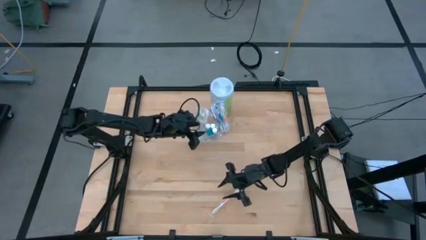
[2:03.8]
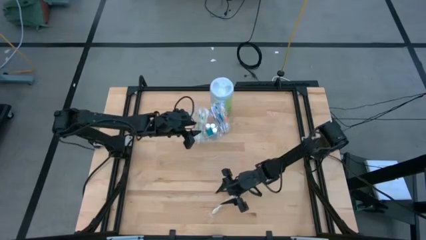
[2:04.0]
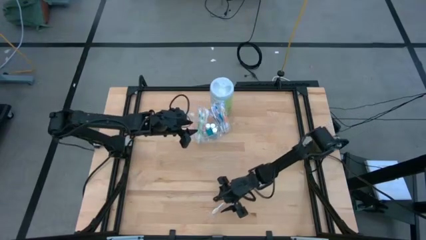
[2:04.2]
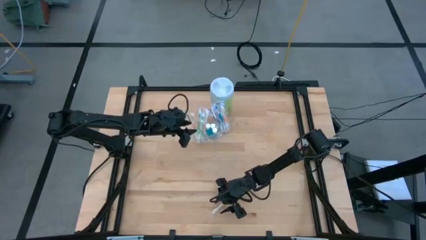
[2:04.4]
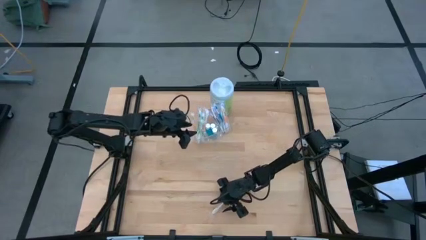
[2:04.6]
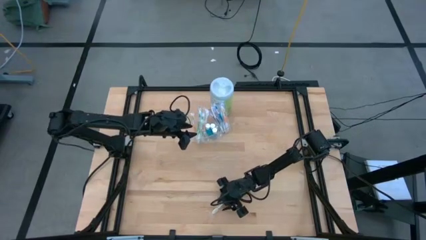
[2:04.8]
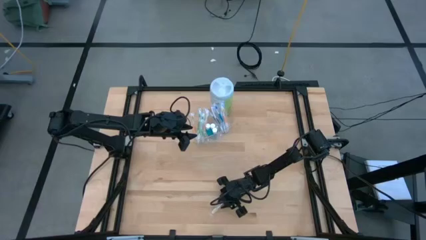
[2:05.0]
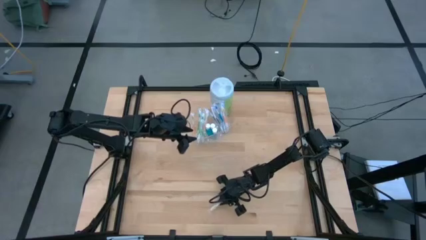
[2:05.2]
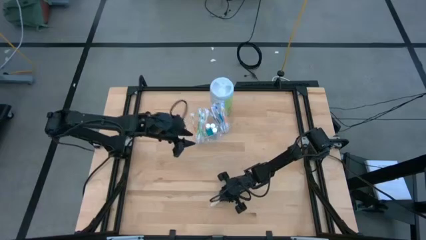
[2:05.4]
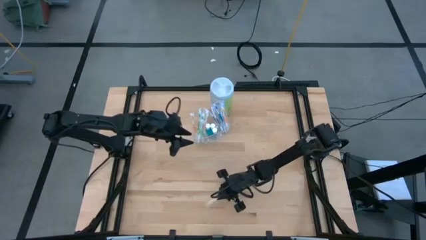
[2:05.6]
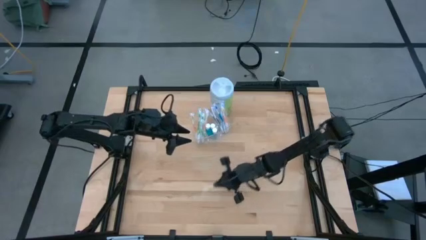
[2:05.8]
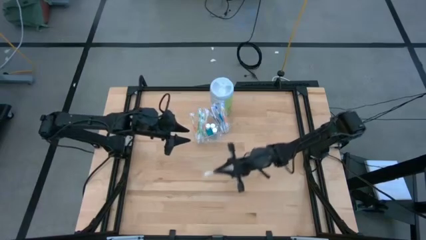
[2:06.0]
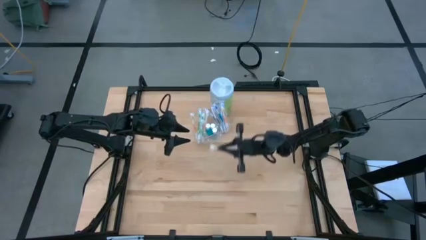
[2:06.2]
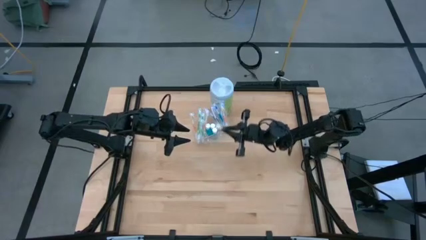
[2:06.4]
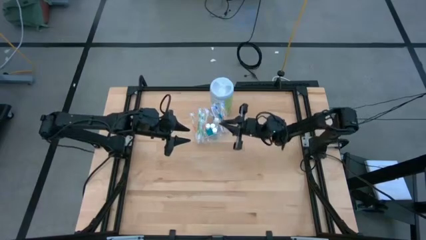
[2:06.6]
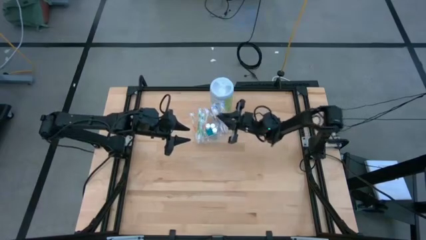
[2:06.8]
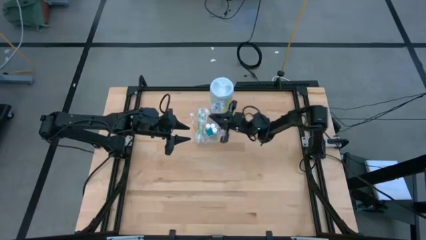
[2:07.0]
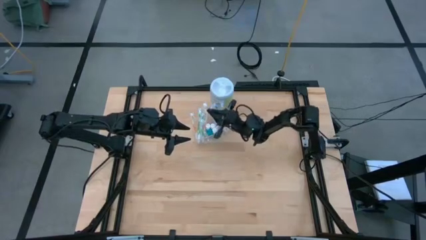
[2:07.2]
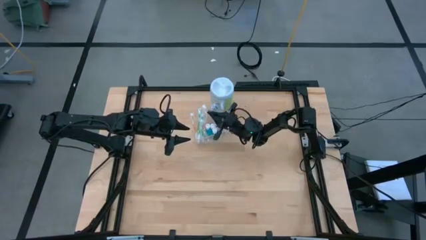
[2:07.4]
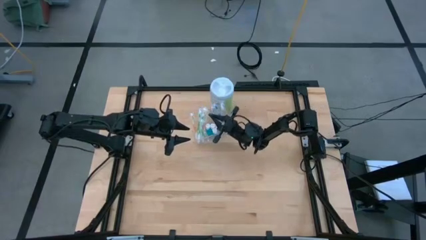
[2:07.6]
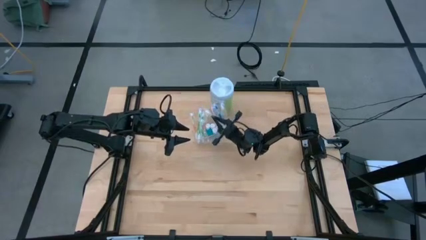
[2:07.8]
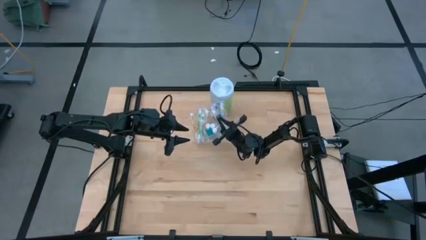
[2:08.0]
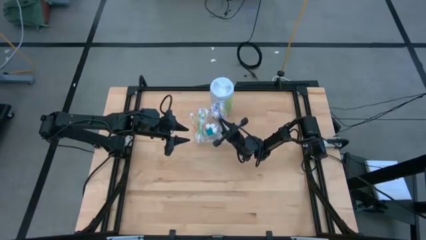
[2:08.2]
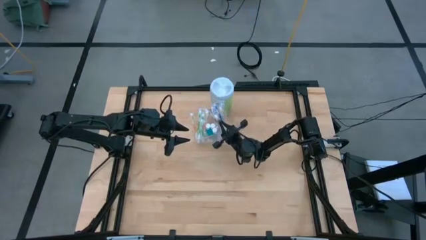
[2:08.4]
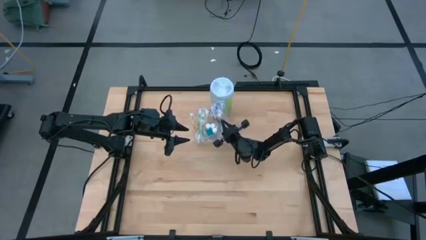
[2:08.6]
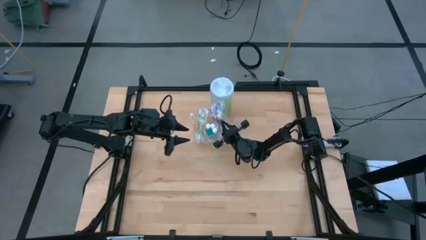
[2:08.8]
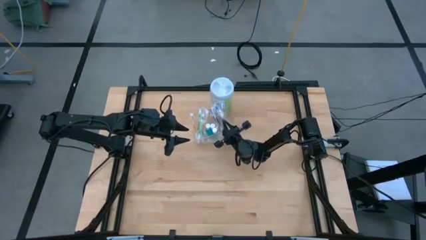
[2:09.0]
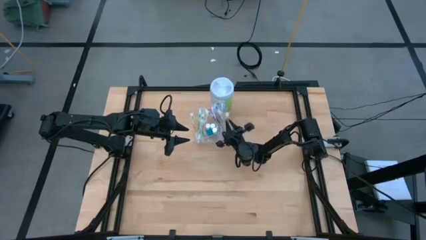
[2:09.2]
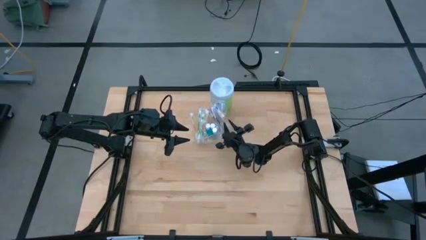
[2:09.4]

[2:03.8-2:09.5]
Task: Pick & Place toothbrushing station
Put the yellow toothbrush into the transparent organizer

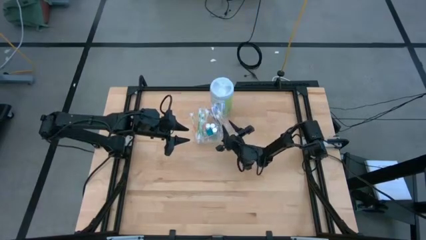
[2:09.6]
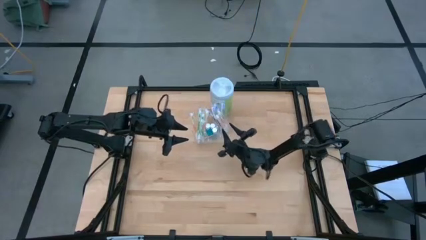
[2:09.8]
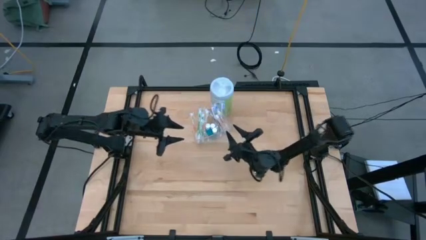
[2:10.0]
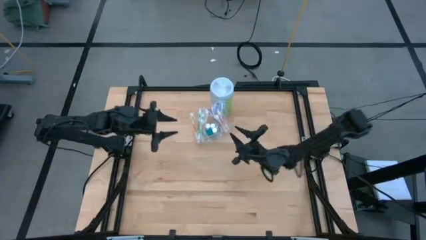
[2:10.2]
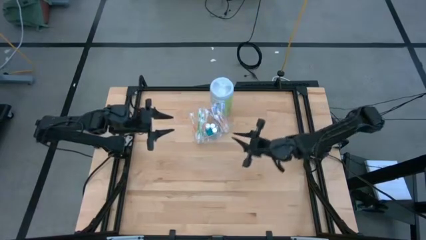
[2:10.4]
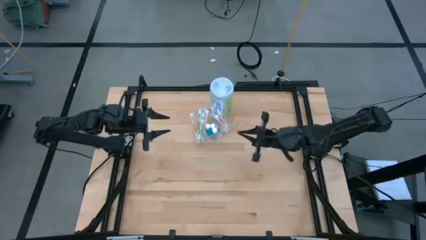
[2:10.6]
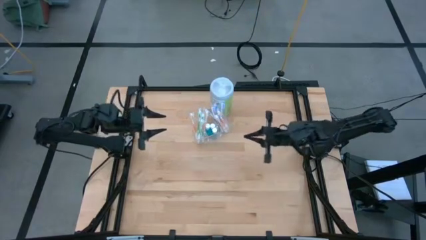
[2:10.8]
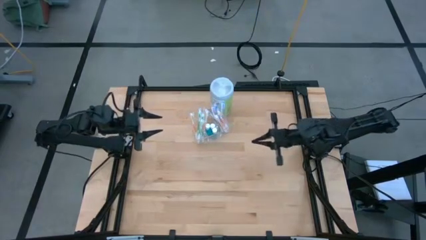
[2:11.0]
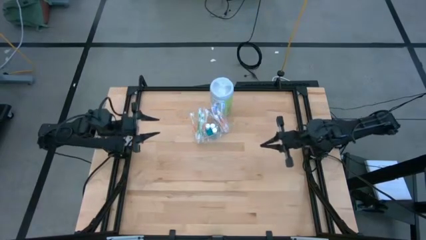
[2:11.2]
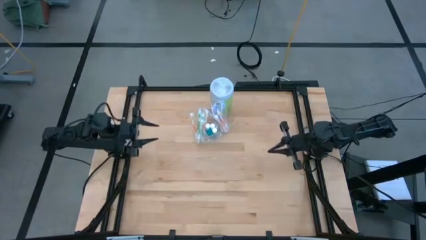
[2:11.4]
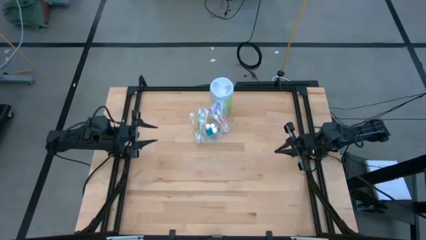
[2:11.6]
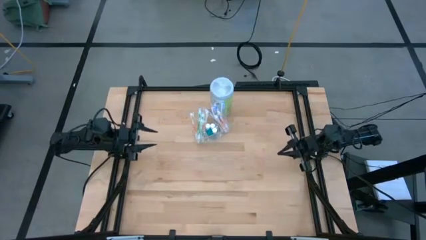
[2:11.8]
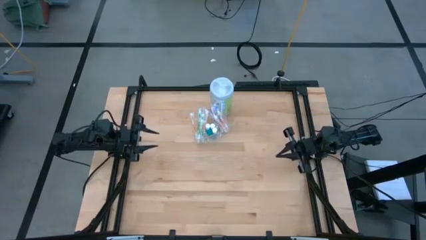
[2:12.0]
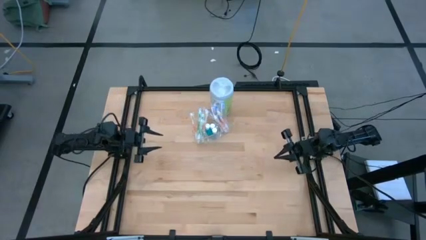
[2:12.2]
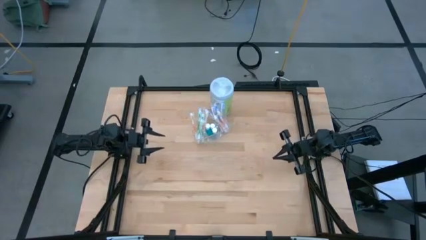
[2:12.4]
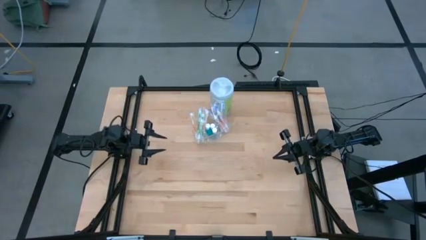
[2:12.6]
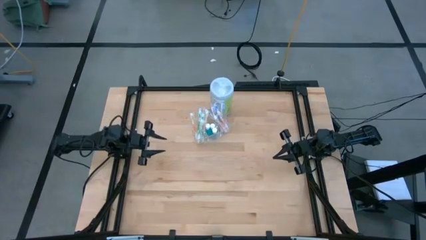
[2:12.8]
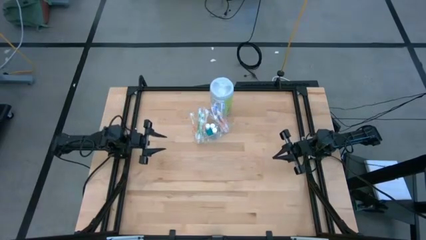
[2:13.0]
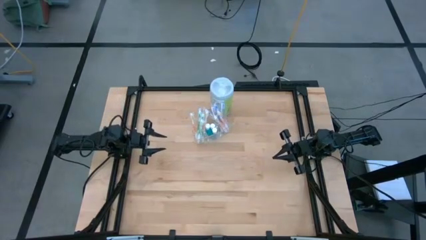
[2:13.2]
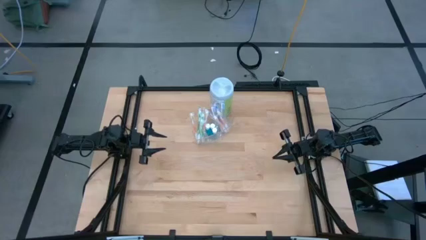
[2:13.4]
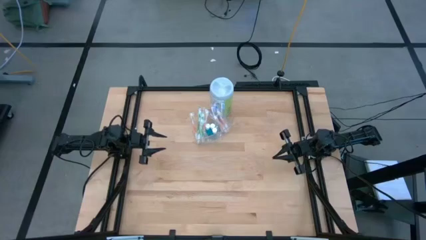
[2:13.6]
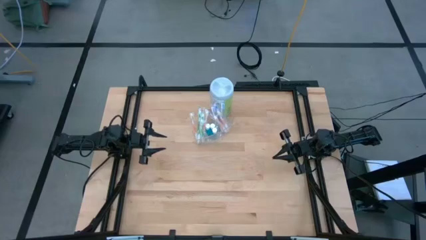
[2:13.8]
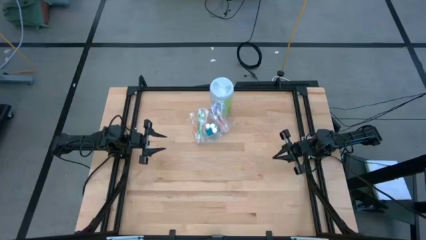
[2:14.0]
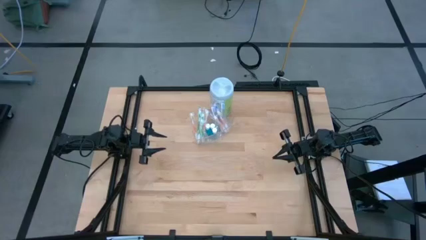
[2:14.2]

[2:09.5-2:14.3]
Return to Home Position

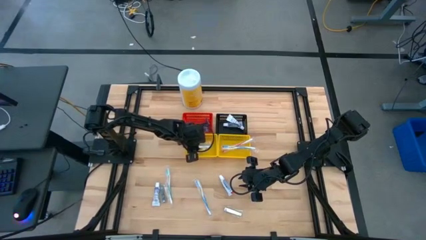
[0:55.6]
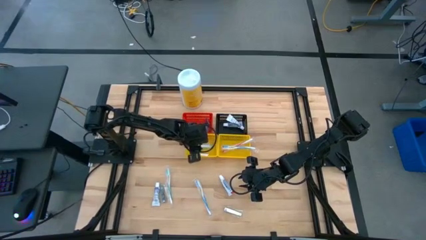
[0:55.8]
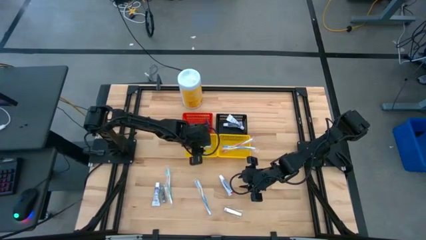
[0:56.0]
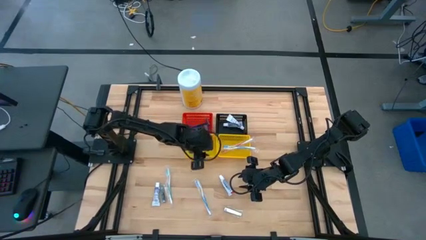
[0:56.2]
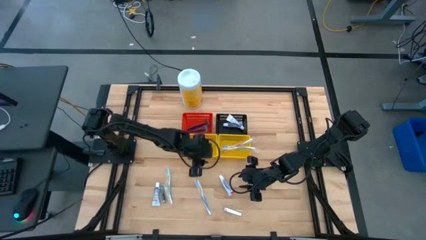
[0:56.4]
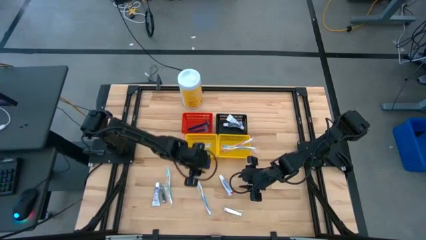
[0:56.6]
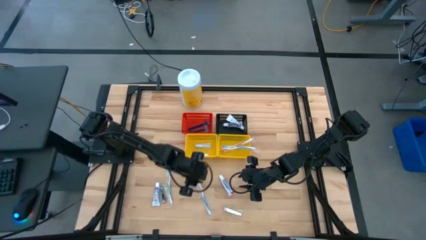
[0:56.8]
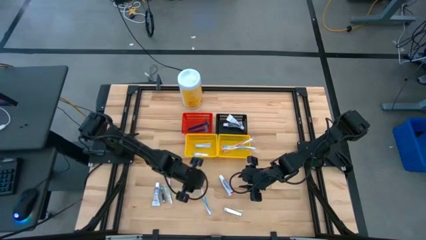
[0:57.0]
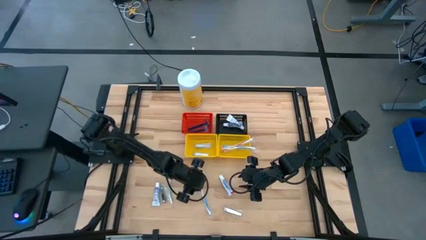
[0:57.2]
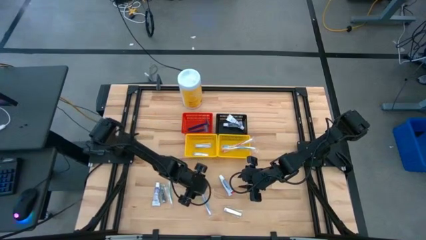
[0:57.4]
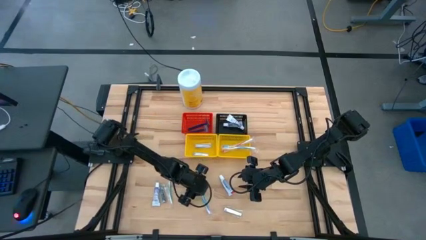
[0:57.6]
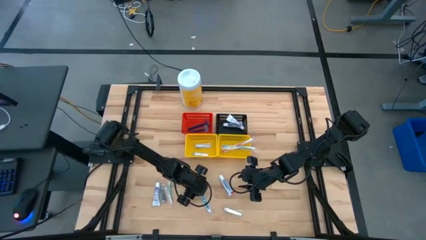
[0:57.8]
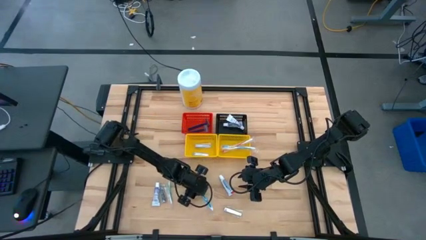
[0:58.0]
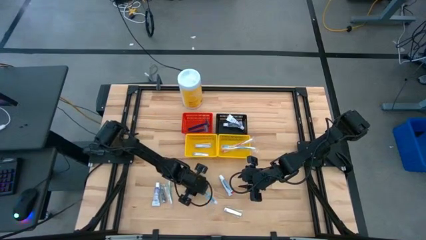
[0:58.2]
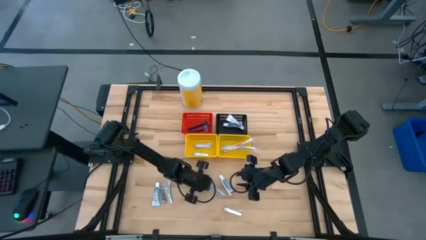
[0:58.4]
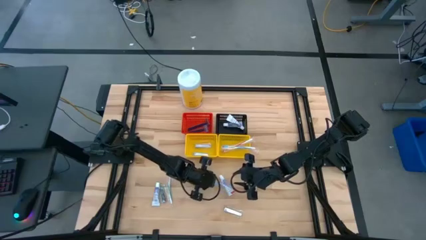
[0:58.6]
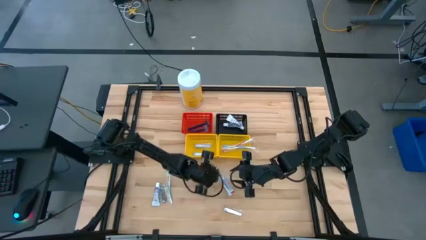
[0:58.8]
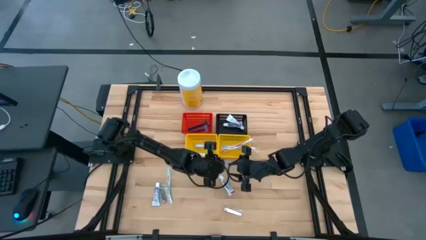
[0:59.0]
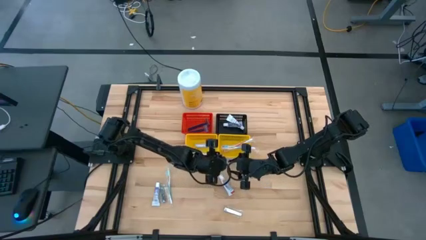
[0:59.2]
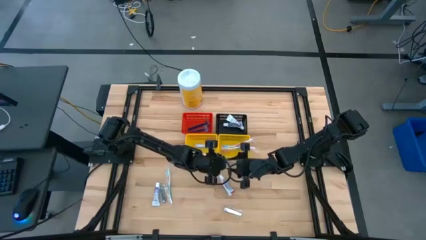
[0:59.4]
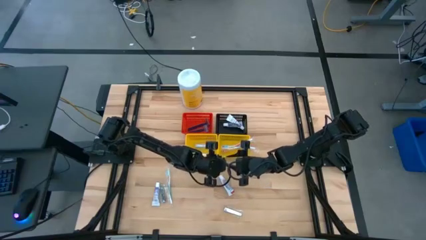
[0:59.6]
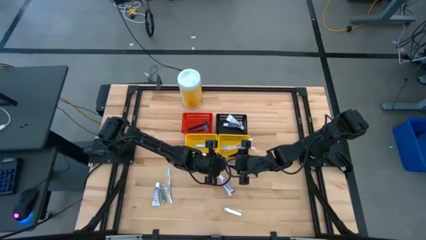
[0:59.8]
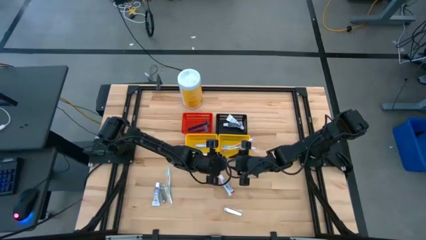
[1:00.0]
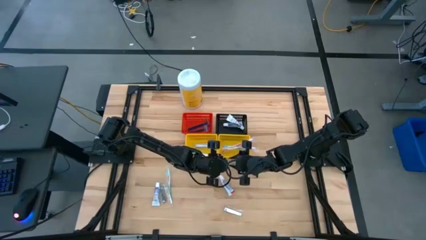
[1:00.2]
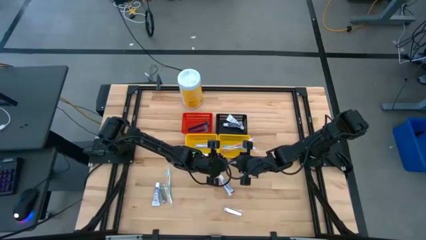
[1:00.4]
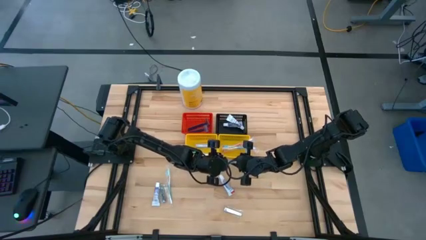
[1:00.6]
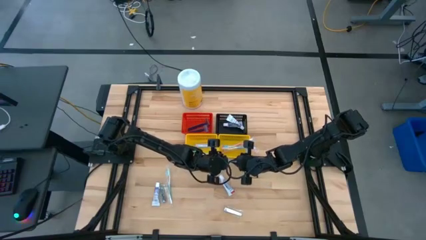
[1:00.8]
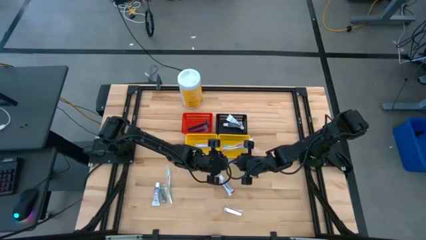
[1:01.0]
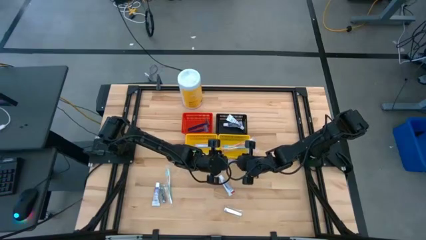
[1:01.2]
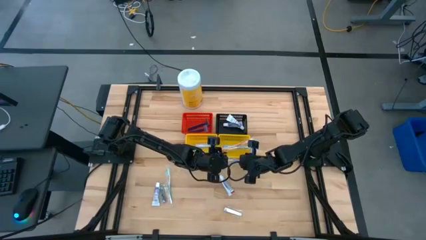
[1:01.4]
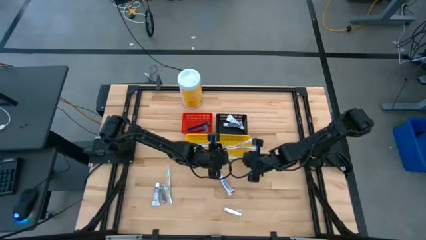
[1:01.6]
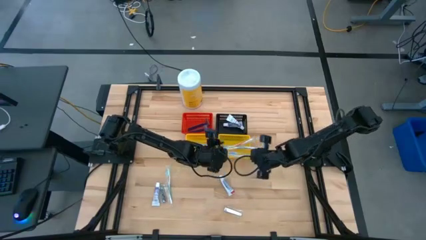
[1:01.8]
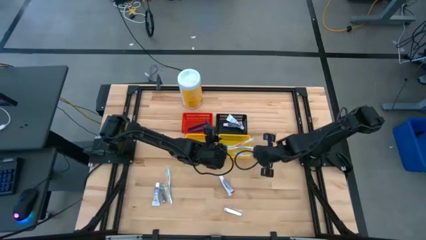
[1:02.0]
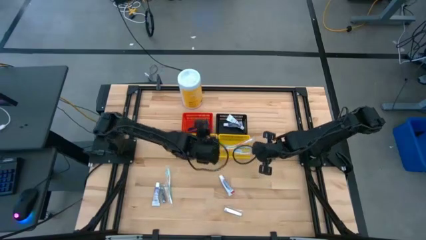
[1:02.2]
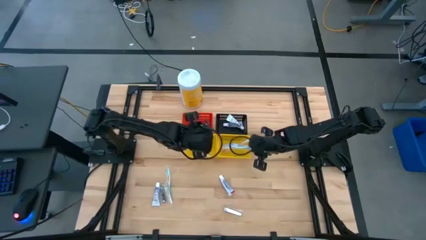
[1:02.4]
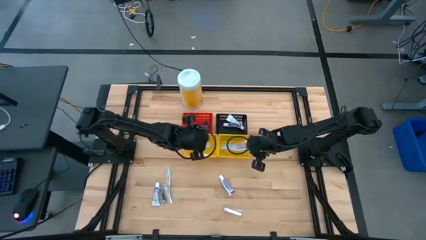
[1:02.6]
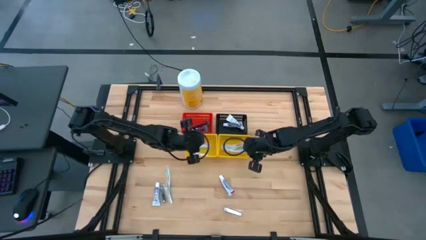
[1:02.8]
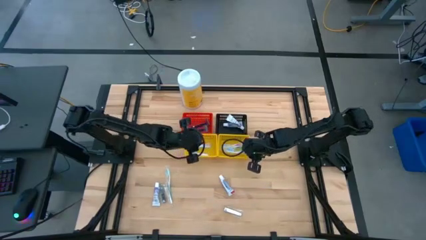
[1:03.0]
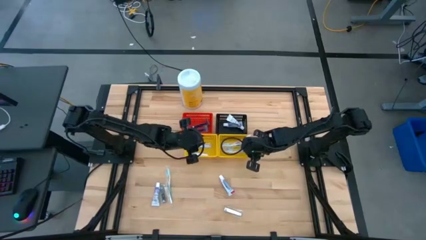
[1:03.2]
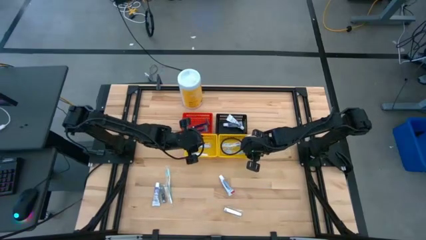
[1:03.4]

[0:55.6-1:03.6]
Task: Pick & Place Travel size toiletries
Put the blue toothbrush into the right yellow bin
